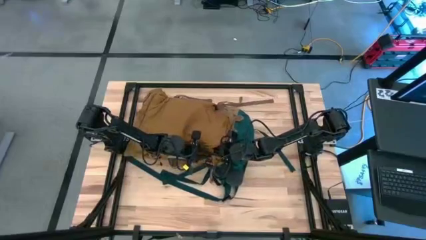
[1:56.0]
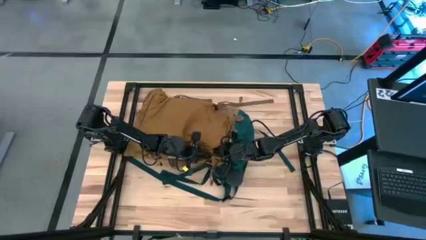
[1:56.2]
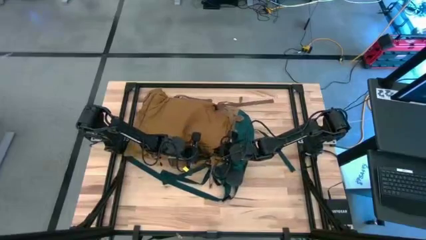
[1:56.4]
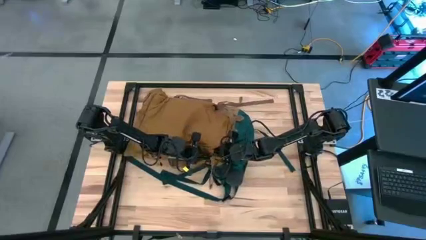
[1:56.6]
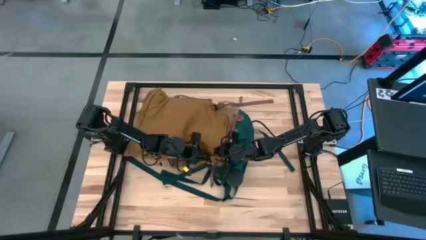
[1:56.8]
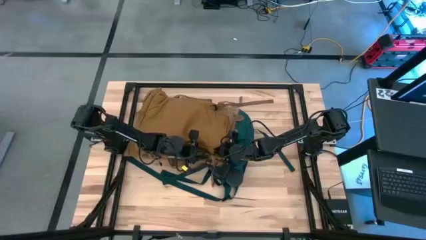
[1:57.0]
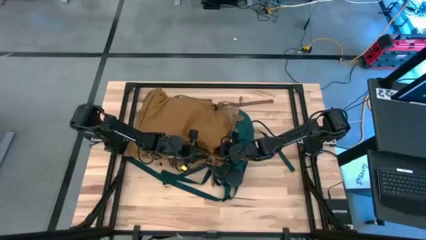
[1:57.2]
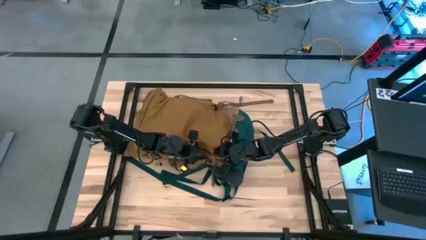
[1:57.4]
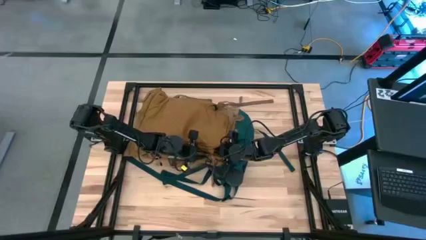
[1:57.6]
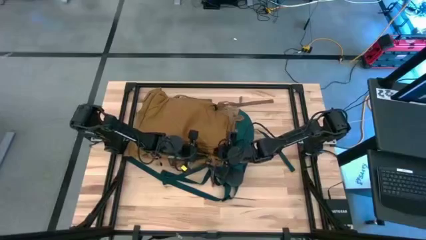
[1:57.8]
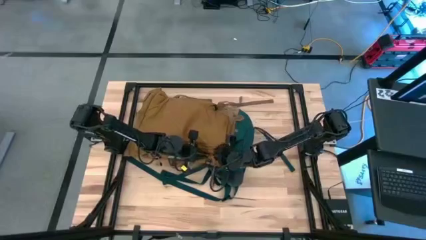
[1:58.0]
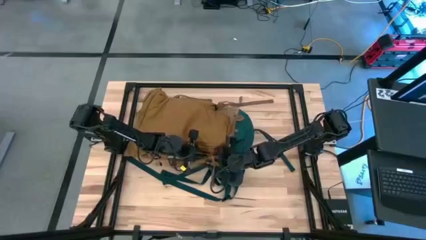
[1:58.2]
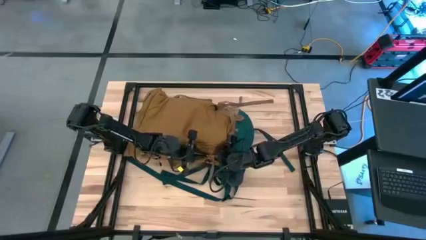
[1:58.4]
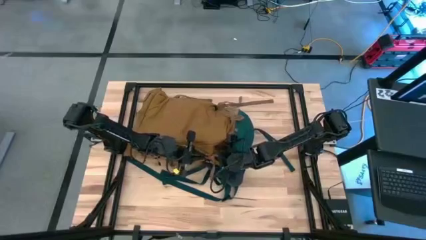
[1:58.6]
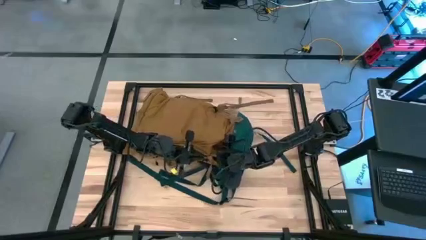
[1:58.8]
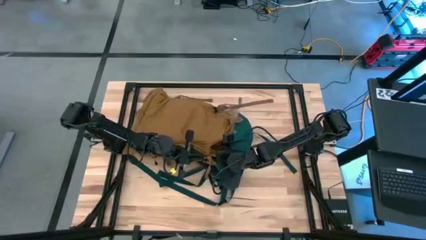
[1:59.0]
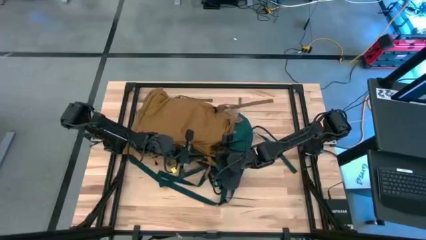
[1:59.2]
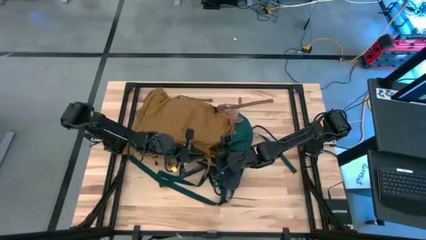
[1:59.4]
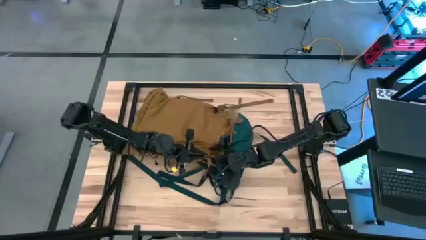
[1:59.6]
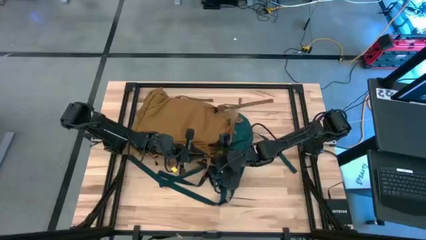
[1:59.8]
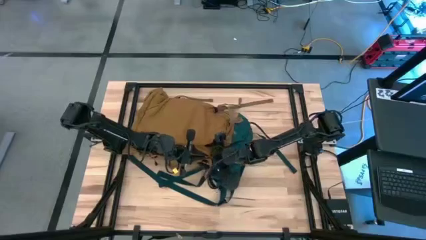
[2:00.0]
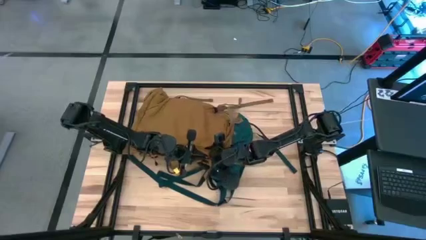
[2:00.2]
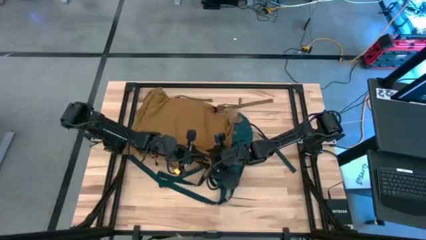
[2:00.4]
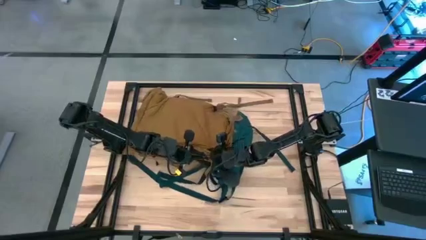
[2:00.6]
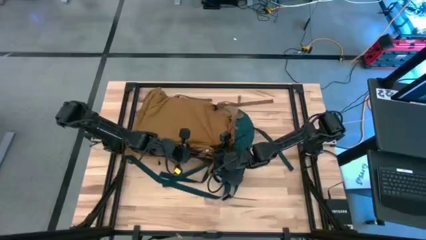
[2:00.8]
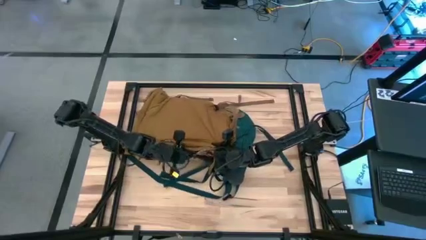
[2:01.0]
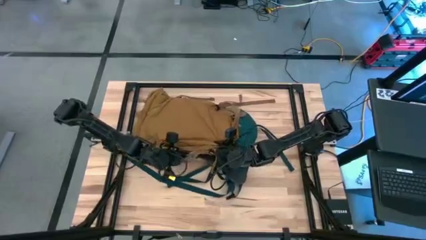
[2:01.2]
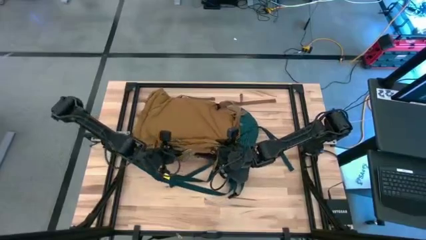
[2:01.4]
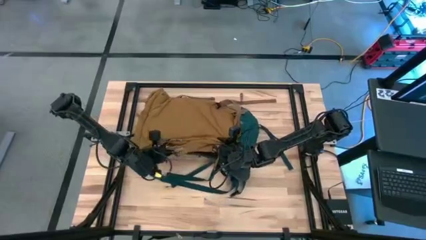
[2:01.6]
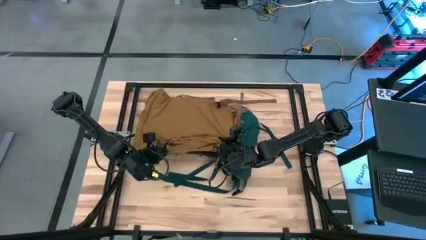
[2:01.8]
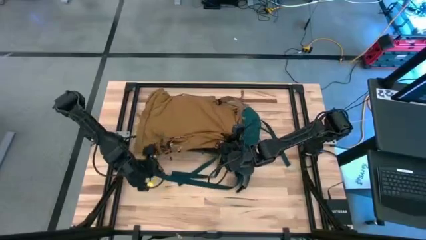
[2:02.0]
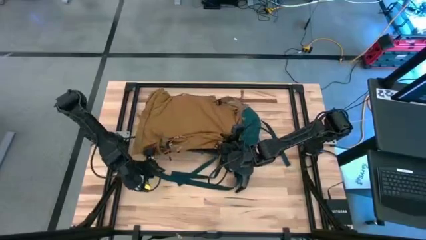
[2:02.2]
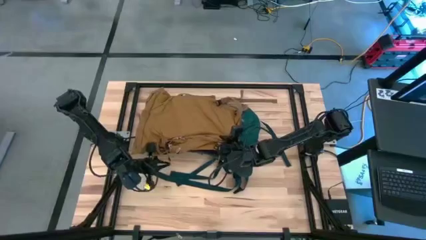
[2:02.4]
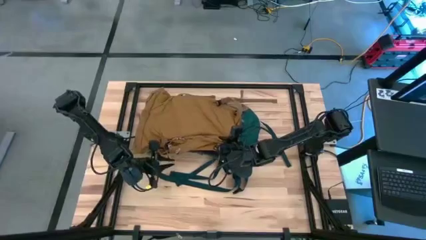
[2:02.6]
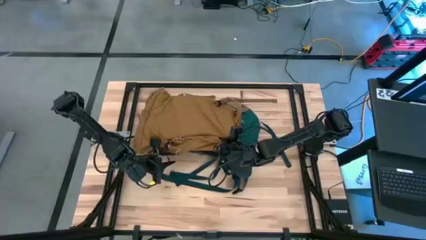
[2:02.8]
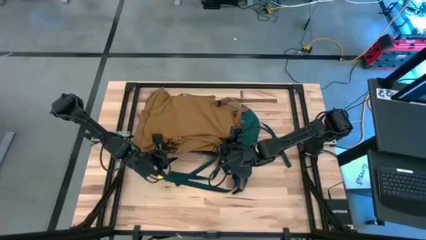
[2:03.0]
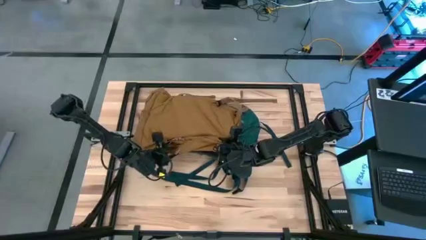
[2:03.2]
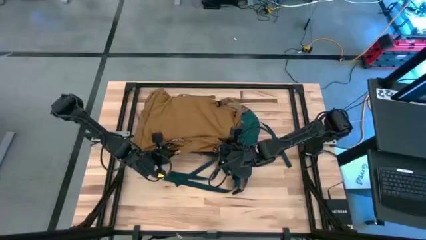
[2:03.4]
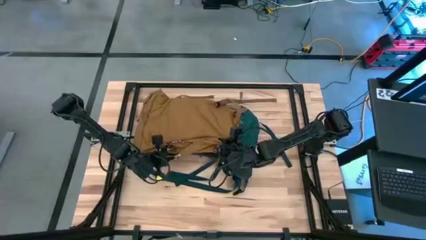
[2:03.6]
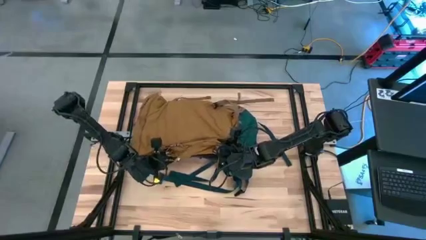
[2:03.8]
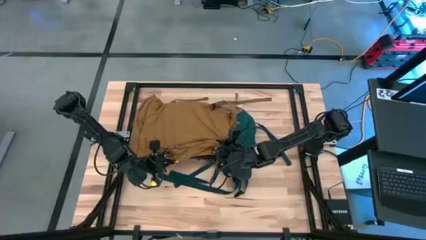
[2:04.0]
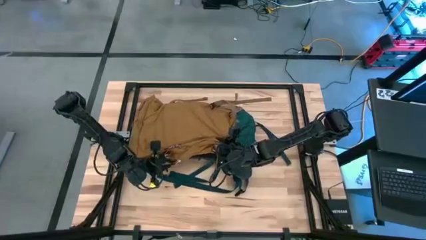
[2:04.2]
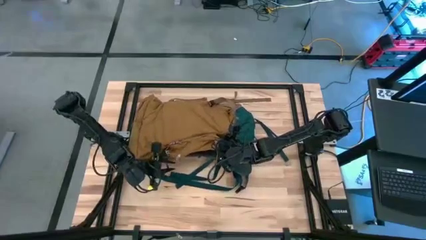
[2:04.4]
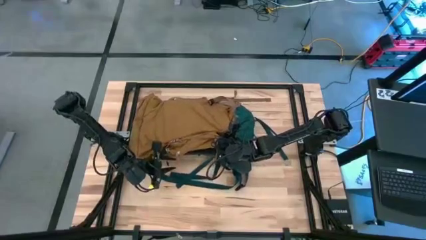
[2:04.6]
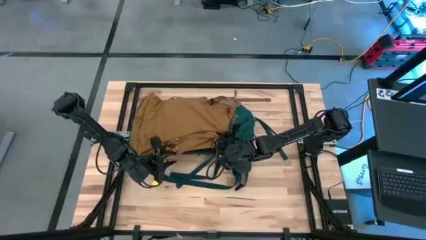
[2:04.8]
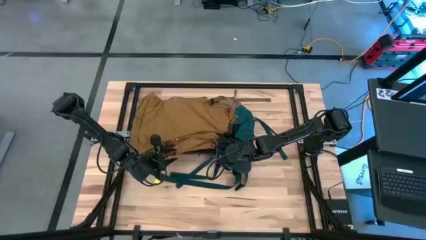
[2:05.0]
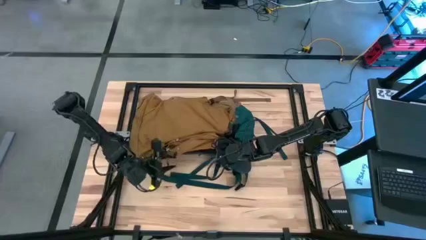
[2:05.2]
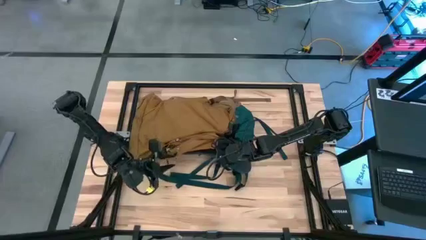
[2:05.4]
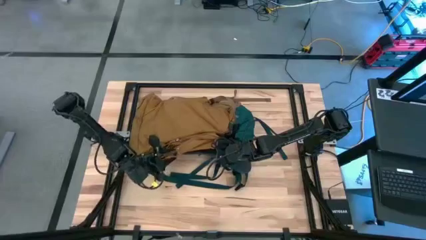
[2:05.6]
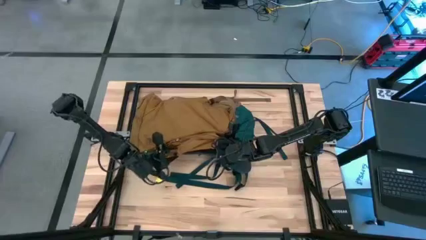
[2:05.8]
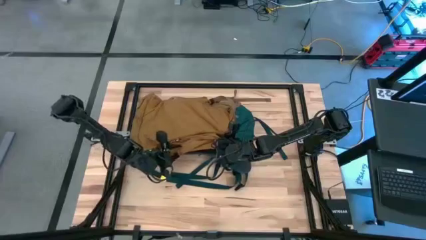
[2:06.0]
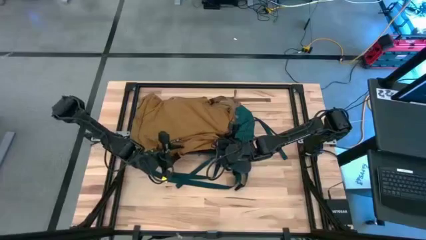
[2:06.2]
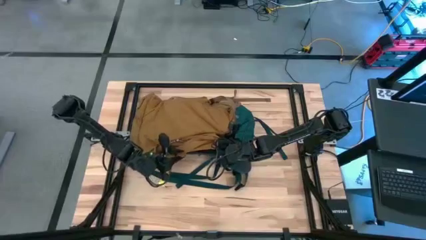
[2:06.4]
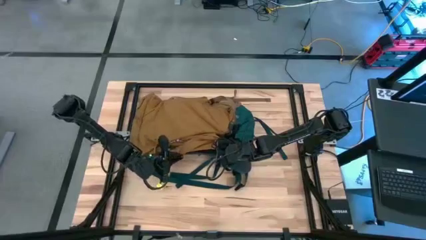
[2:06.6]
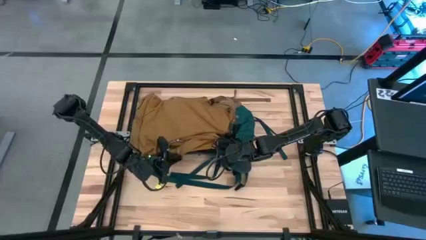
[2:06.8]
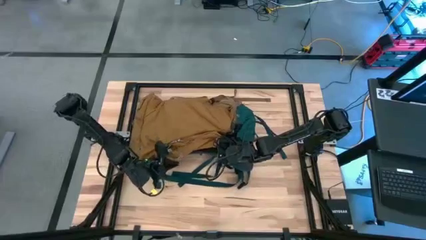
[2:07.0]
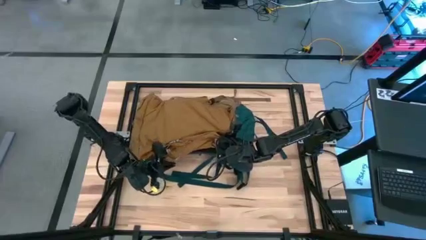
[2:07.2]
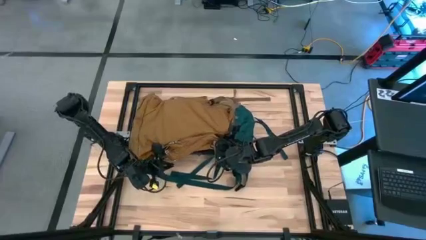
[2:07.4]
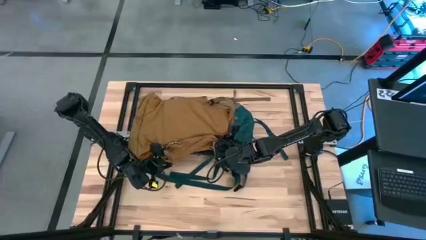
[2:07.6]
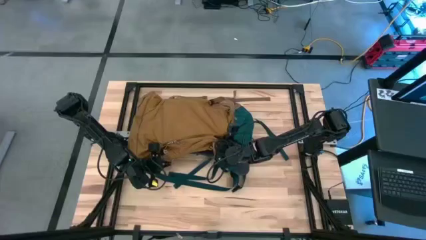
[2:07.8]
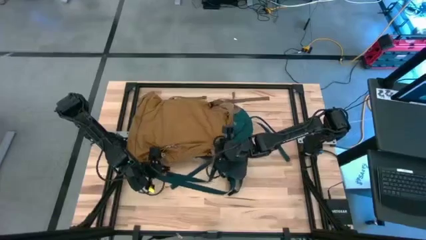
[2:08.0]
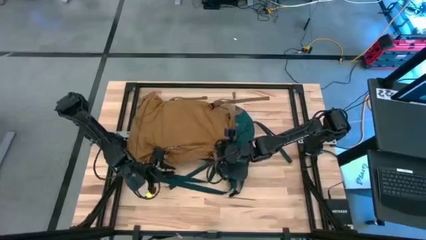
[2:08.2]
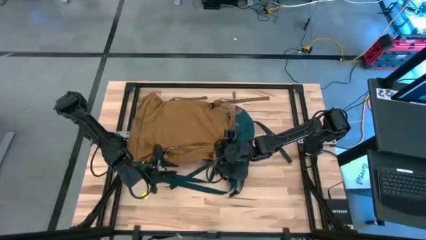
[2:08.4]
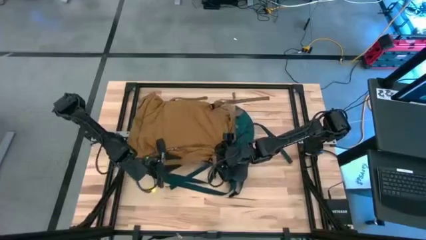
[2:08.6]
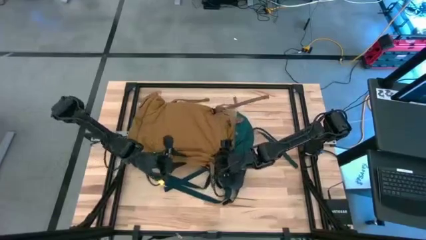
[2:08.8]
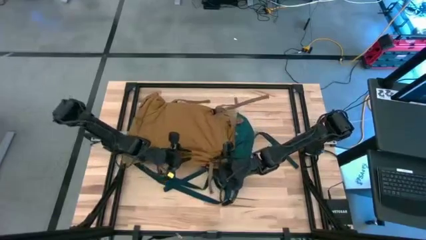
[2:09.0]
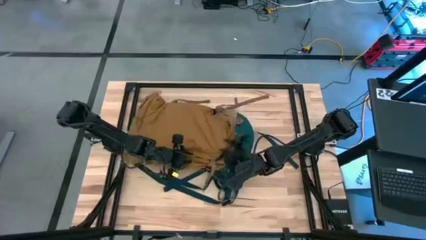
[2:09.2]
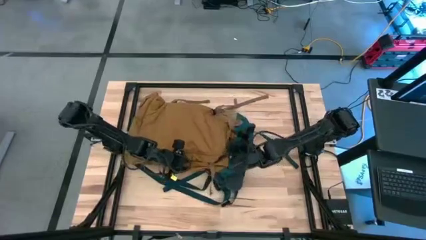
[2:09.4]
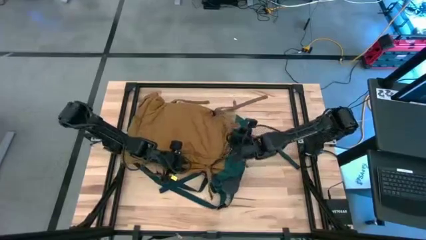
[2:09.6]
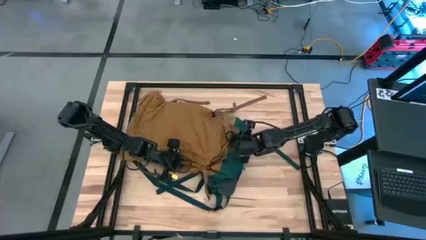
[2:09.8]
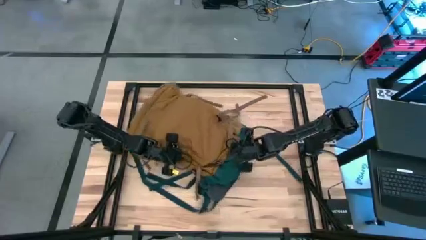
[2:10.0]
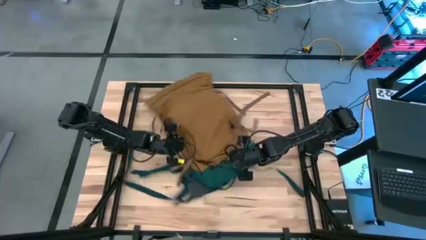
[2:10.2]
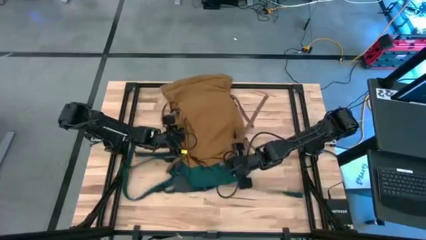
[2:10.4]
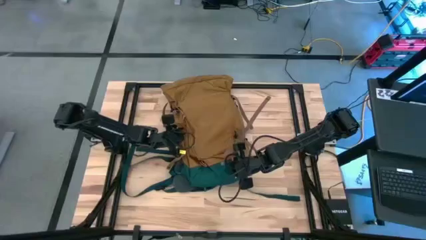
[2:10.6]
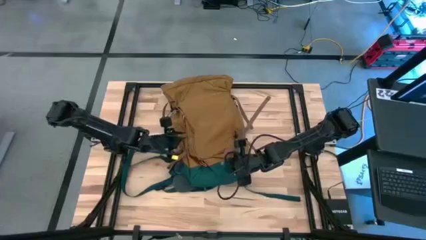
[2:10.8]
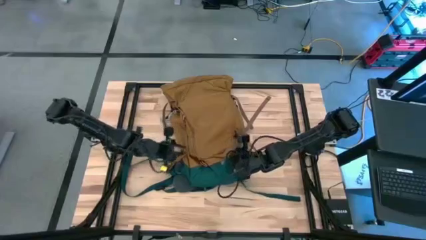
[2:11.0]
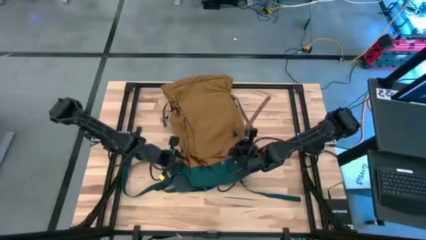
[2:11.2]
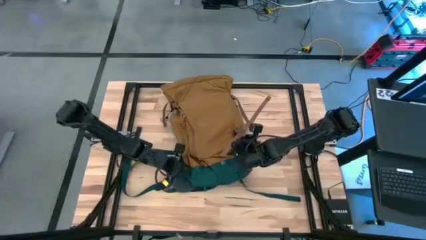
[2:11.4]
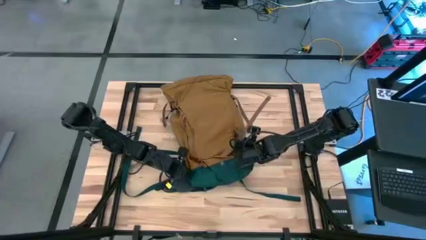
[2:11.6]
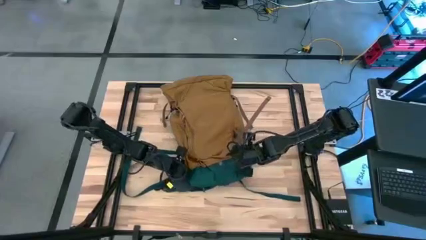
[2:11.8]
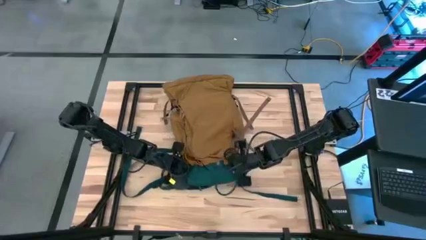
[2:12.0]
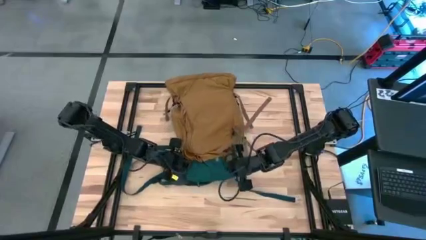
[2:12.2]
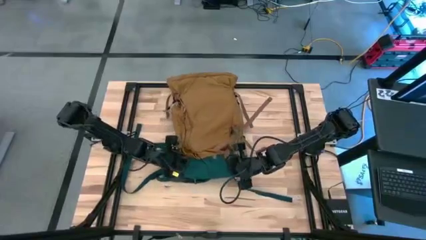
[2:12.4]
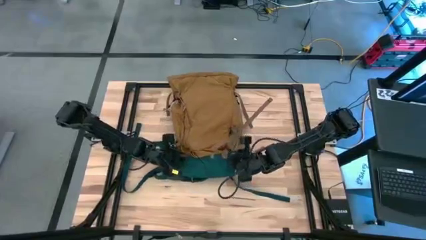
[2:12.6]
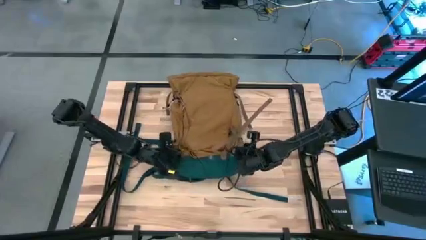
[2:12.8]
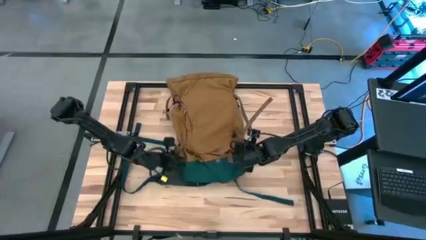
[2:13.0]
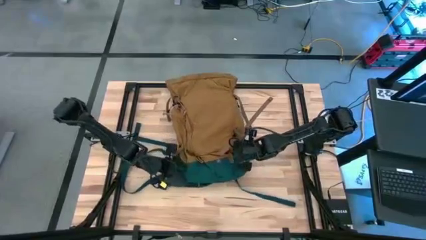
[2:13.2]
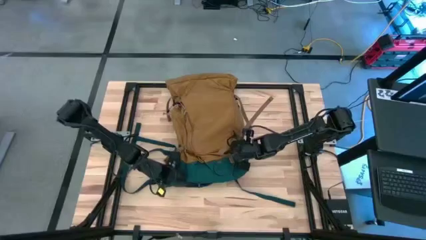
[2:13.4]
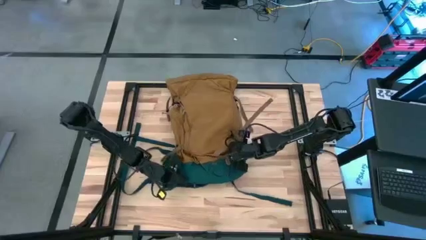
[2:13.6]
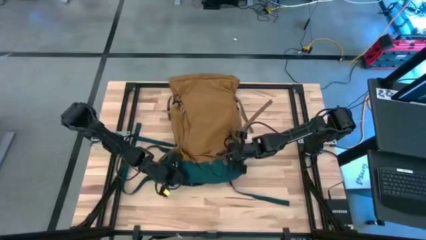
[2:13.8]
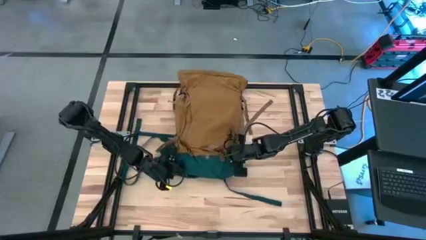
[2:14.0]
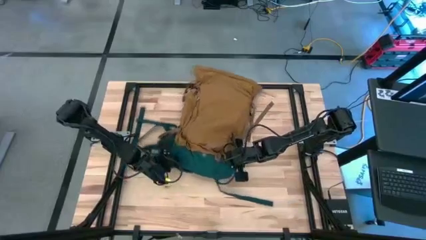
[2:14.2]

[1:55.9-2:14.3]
Task: Unpack backpack
Open the brown backpack
